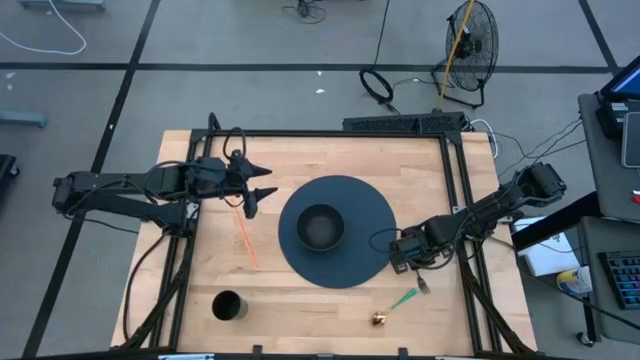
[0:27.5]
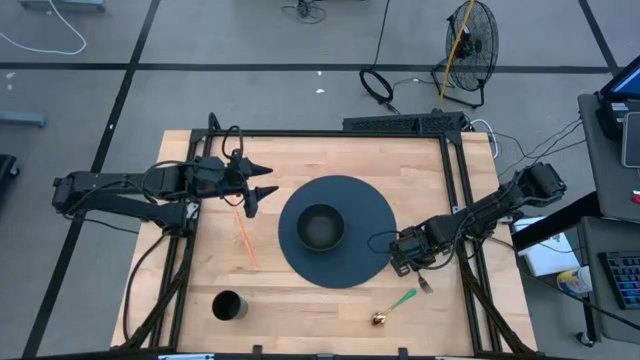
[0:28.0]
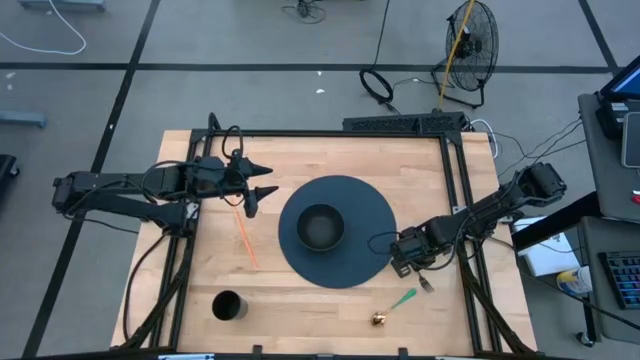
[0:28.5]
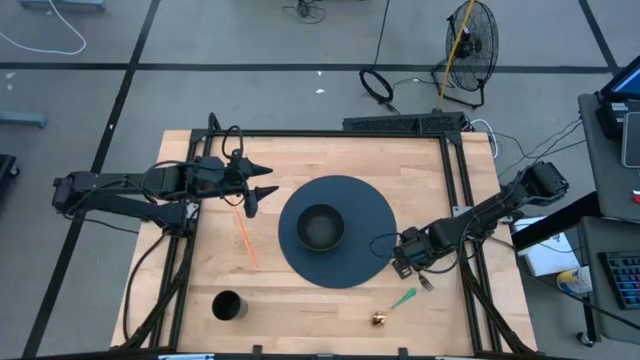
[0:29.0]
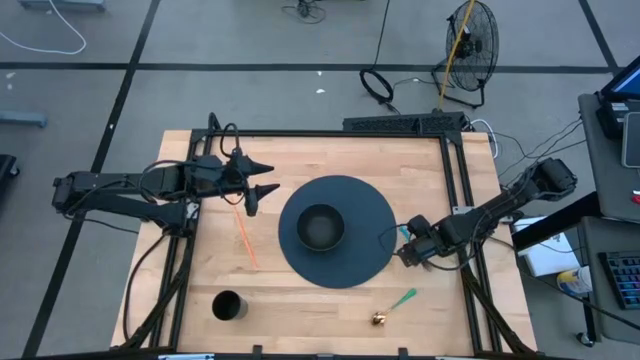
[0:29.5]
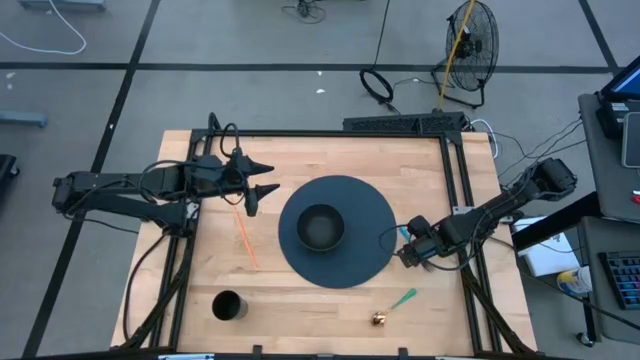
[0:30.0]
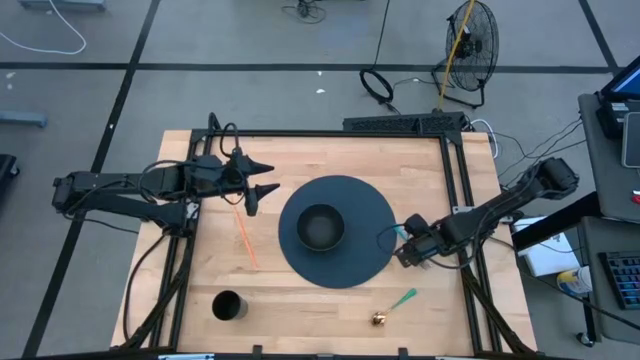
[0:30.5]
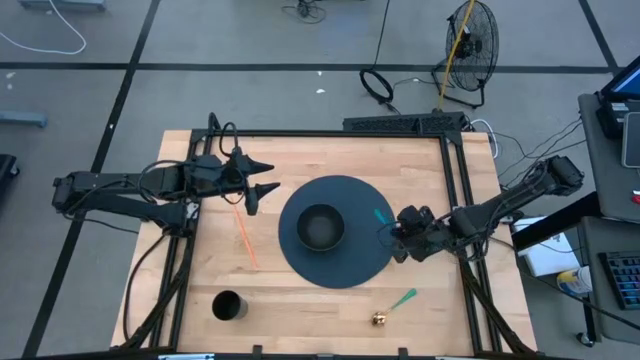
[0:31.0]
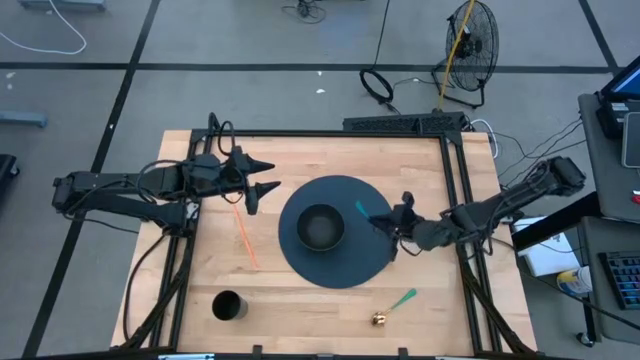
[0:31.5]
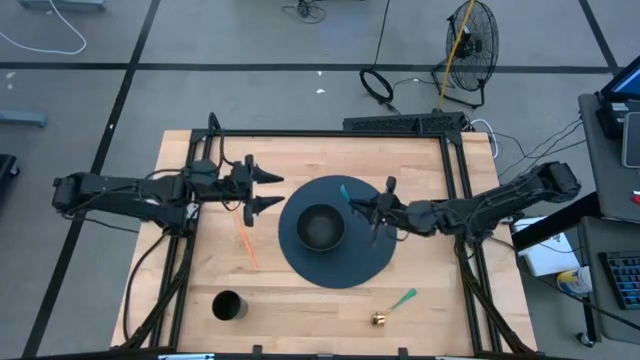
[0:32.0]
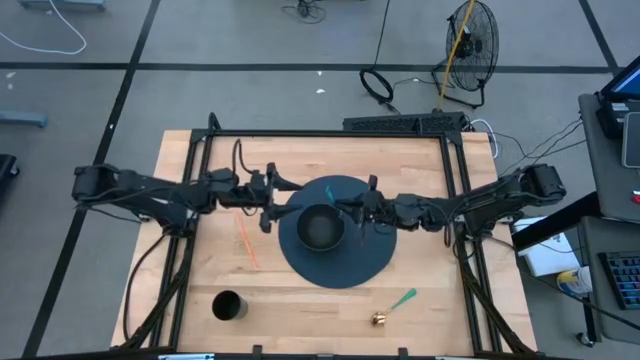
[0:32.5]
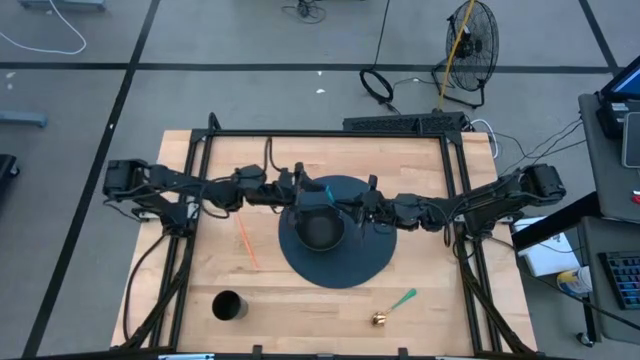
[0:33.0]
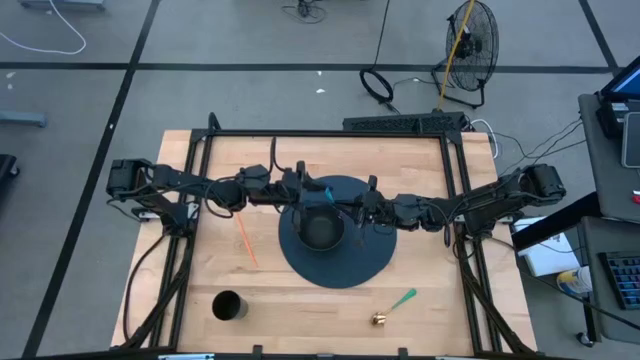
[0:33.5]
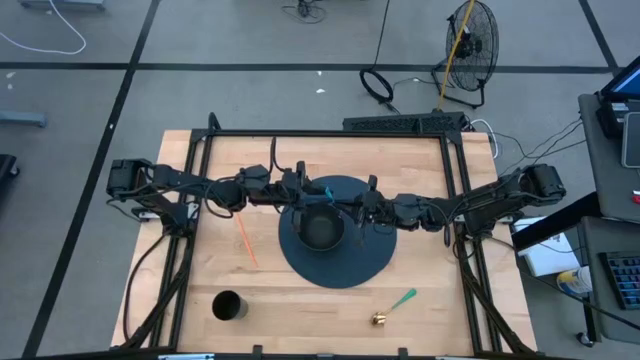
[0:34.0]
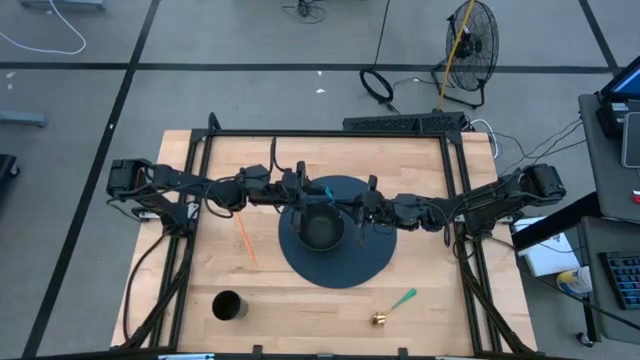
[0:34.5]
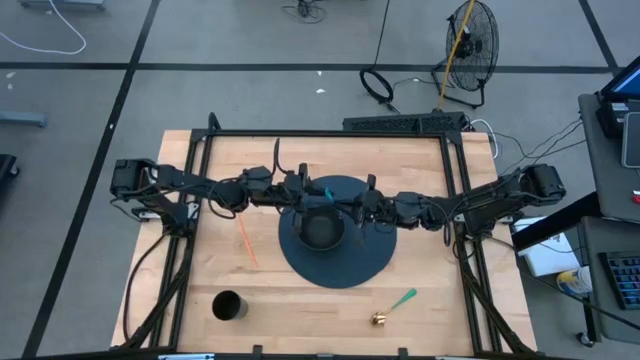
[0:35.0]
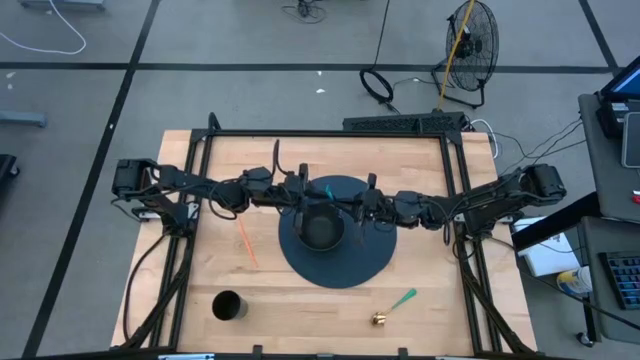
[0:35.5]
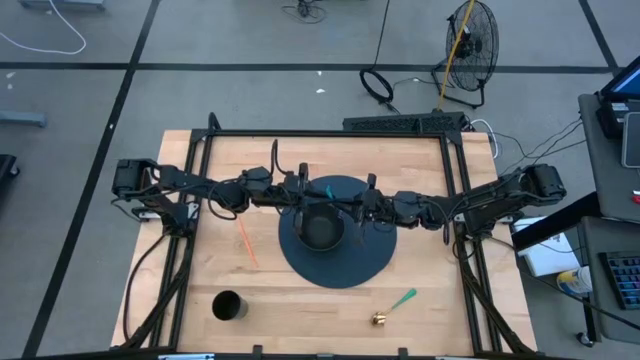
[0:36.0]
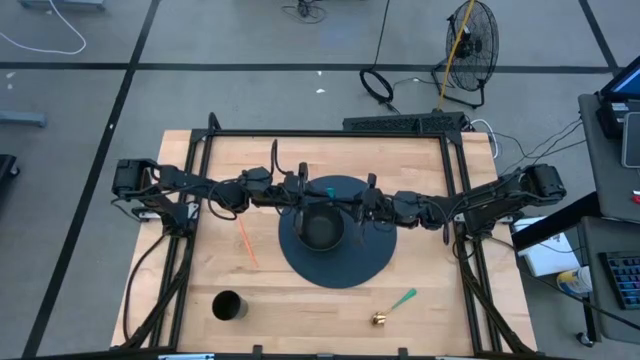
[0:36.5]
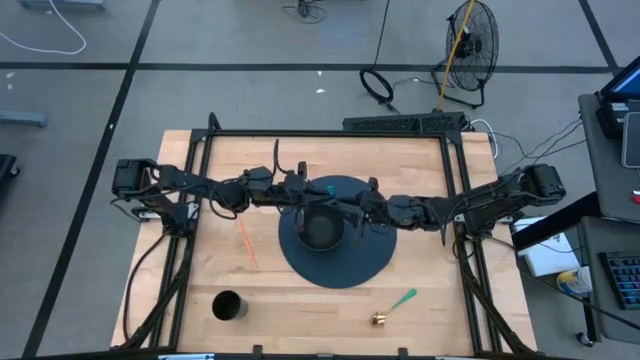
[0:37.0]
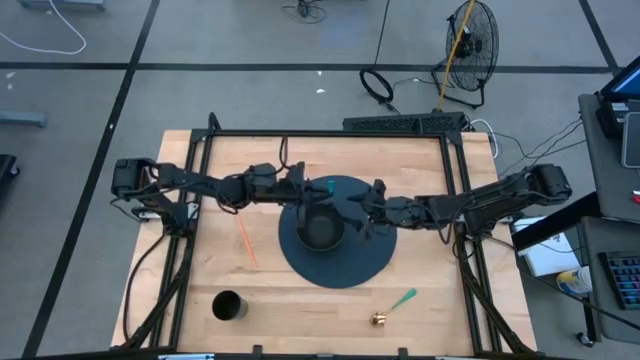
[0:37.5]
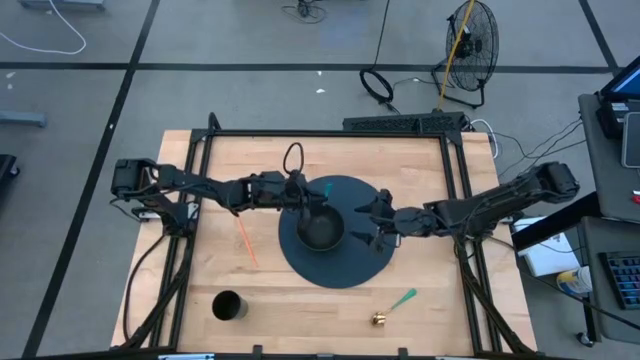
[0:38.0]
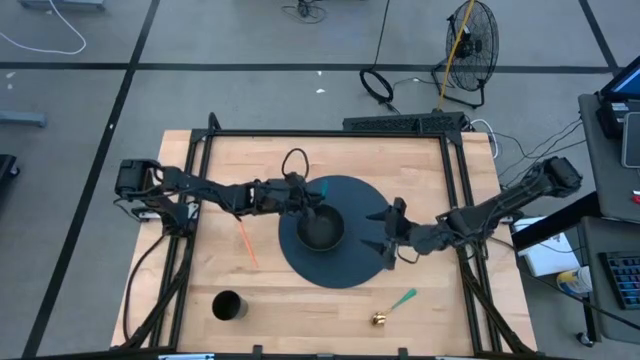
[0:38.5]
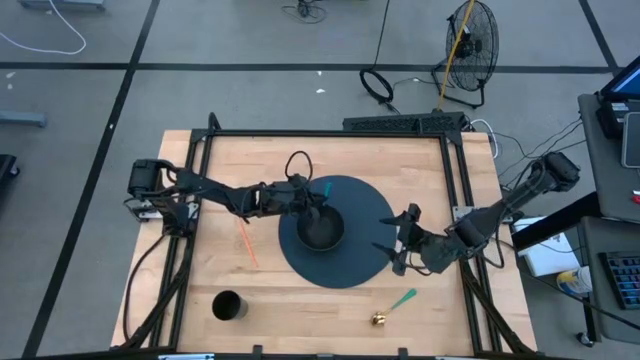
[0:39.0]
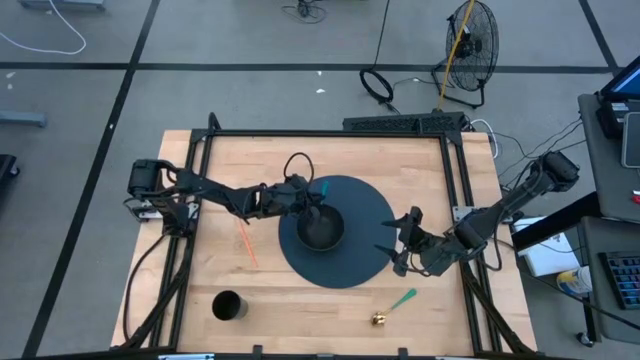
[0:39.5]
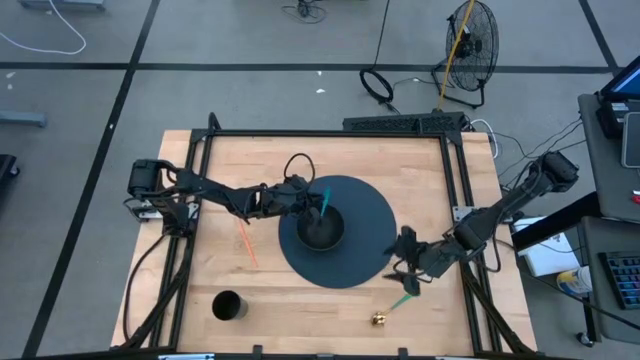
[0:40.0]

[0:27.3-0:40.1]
Task: Pick & Place Utensil
Put the blue fork into the black bowl on the blue table placemat

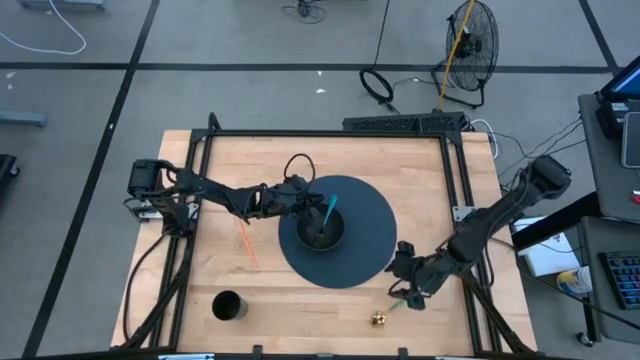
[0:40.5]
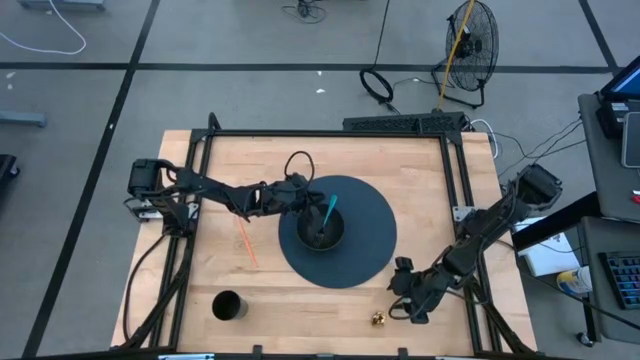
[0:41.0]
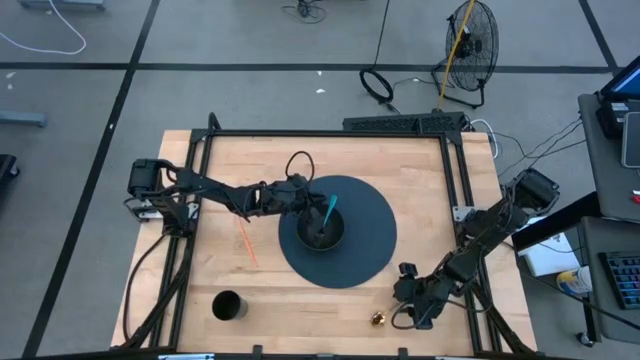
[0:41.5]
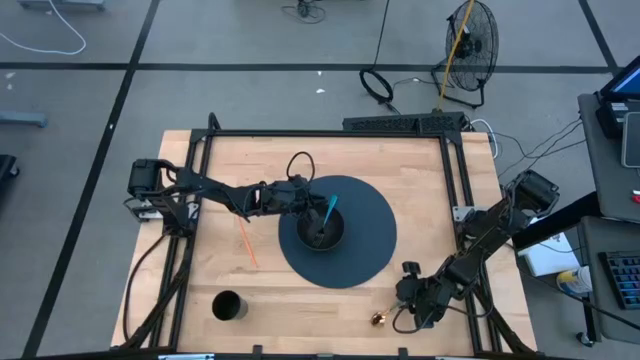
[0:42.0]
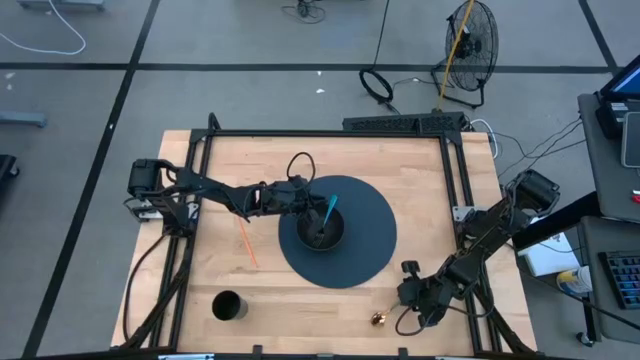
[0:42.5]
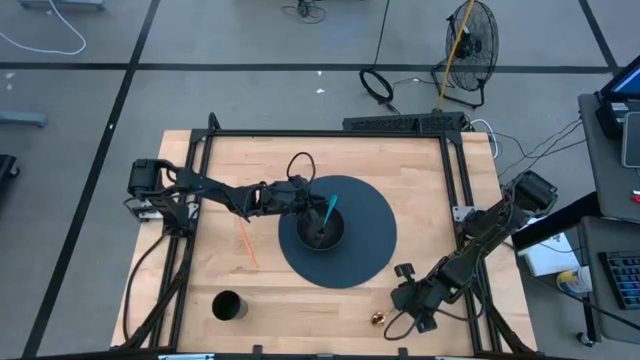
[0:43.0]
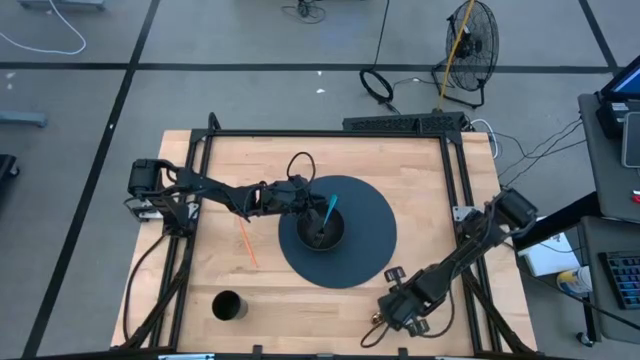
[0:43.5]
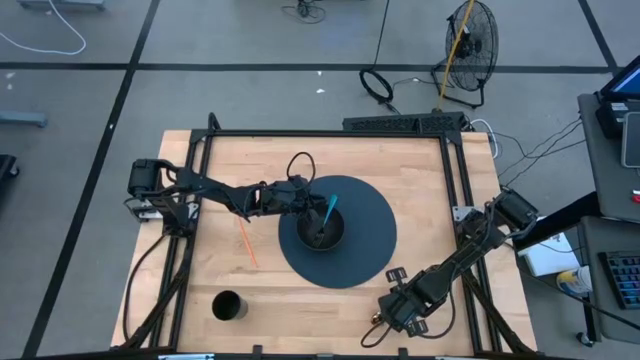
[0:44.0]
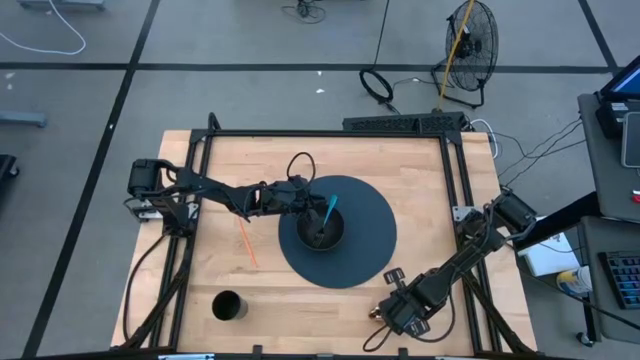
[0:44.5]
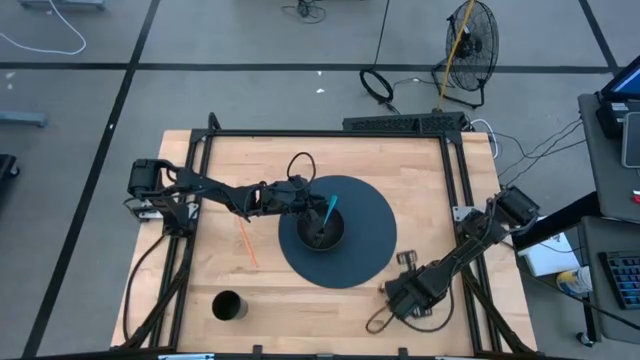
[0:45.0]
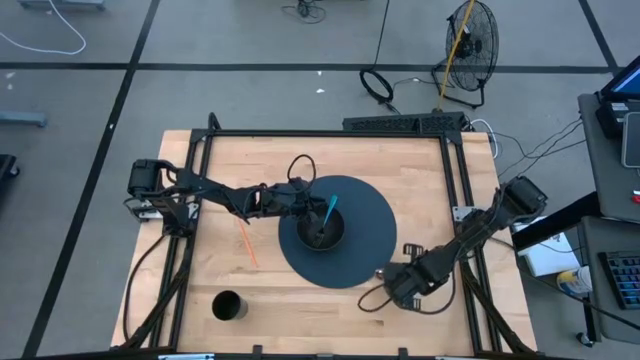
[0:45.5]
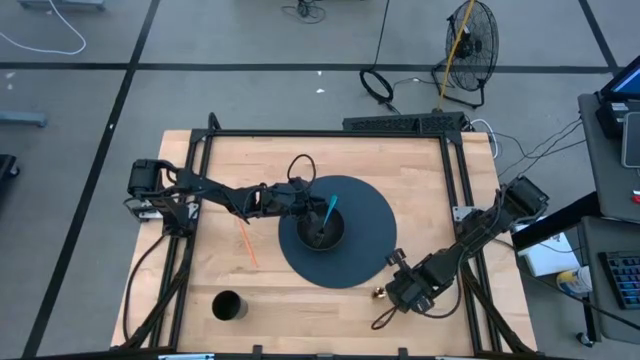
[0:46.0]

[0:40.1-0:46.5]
Put the gold spoon into the black bowl on the blue table placemat

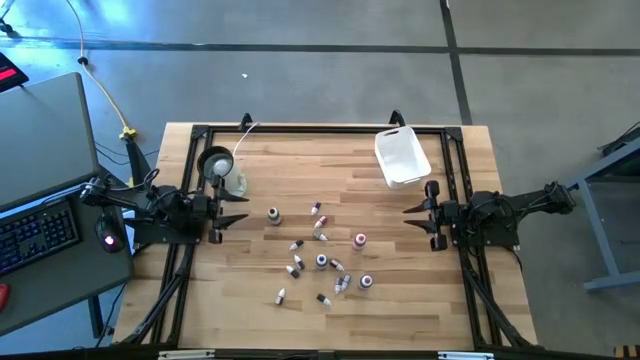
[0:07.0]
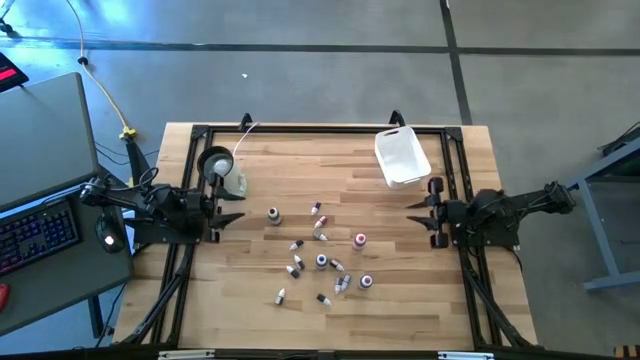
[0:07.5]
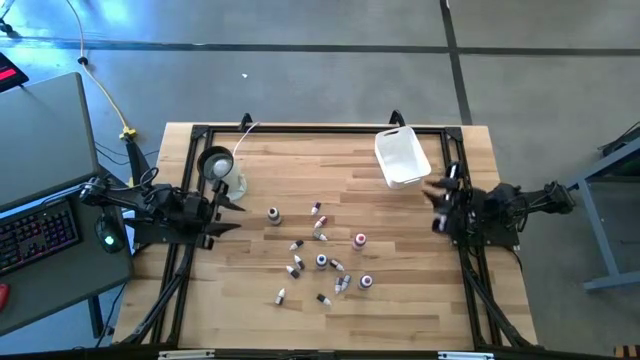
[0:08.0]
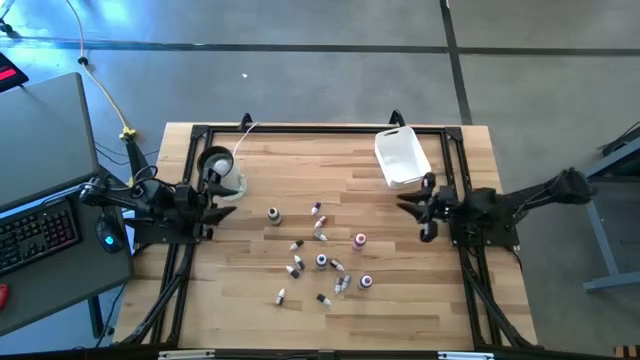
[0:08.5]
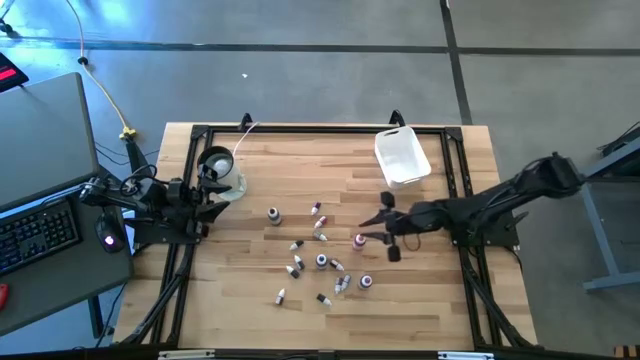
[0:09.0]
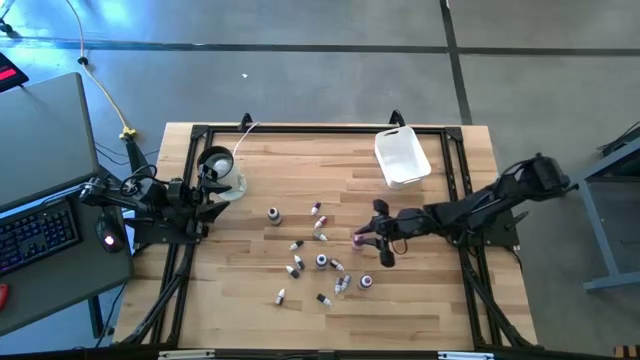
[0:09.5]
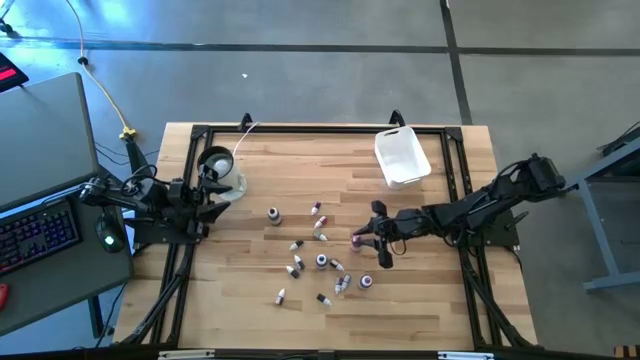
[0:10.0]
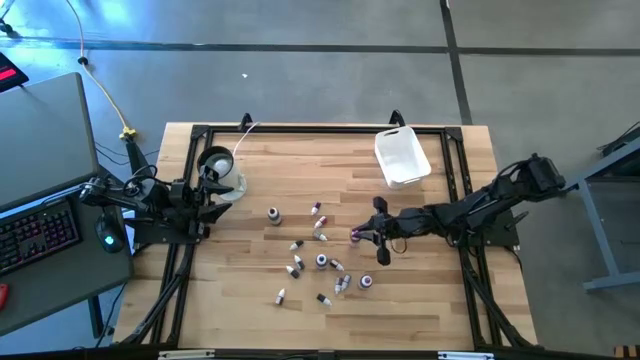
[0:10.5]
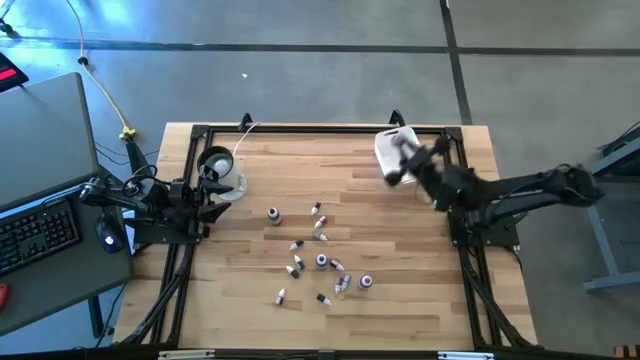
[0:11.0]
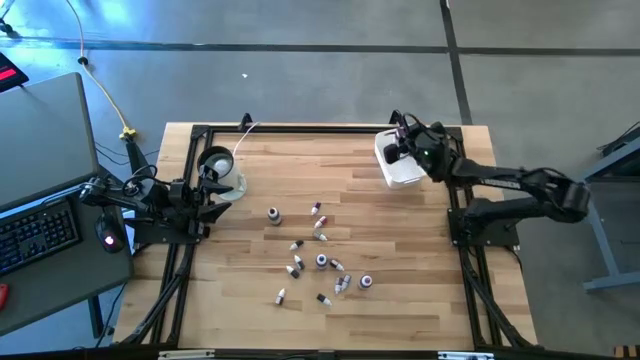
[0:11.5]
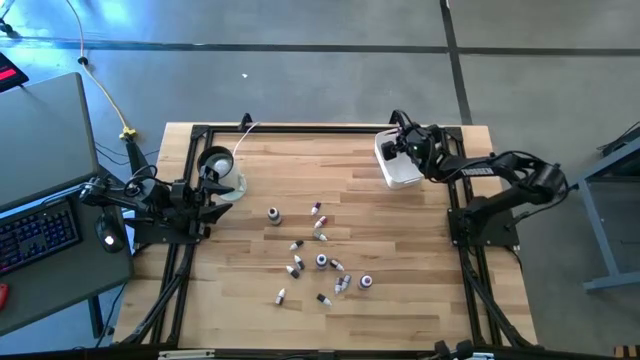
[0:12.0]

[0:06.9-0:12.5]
Task: Pick & Place food coloring
Put the big red food coloring bottle into the white bin
